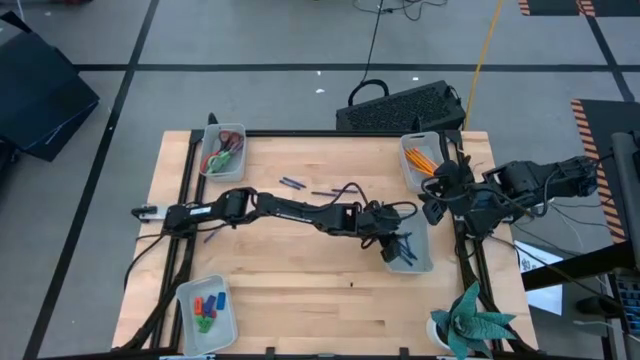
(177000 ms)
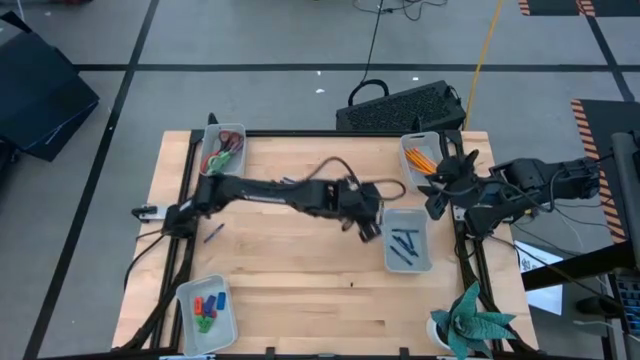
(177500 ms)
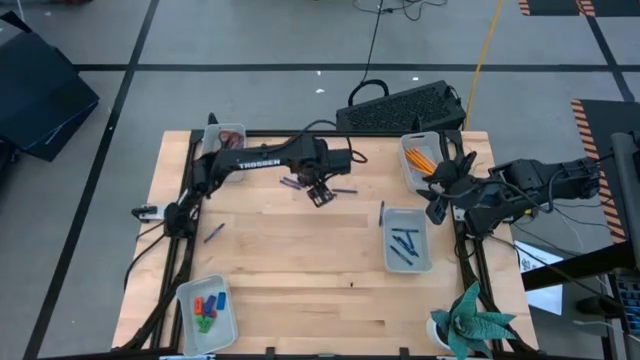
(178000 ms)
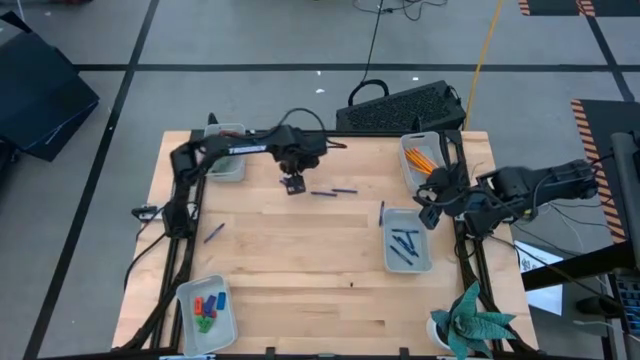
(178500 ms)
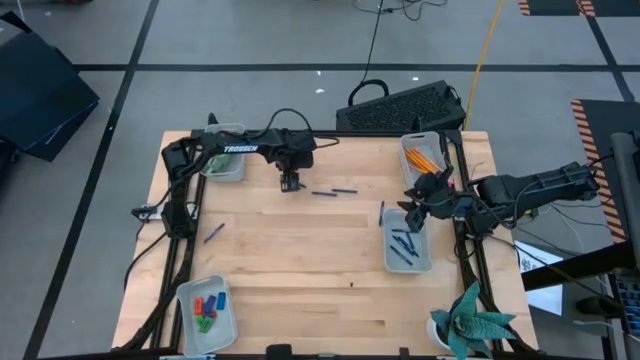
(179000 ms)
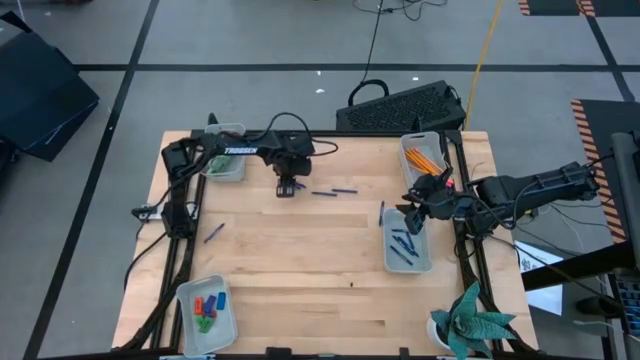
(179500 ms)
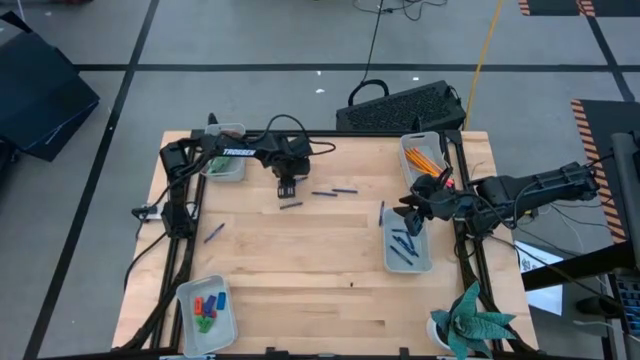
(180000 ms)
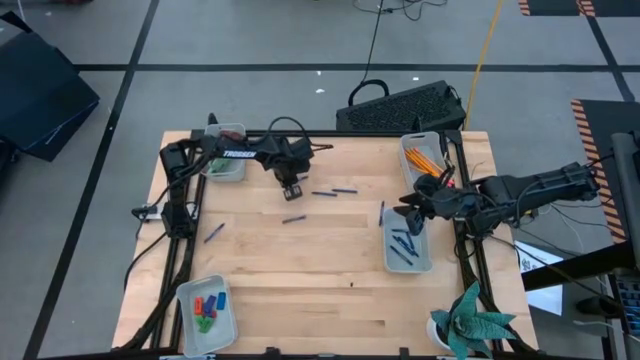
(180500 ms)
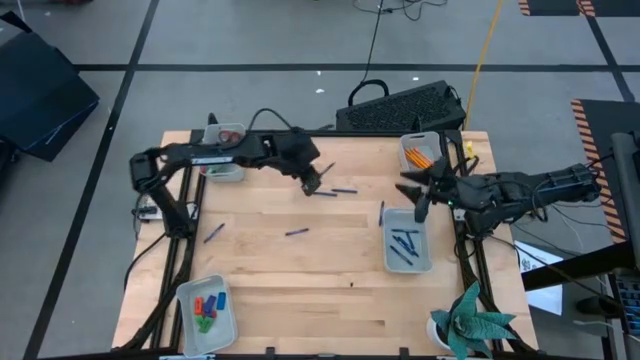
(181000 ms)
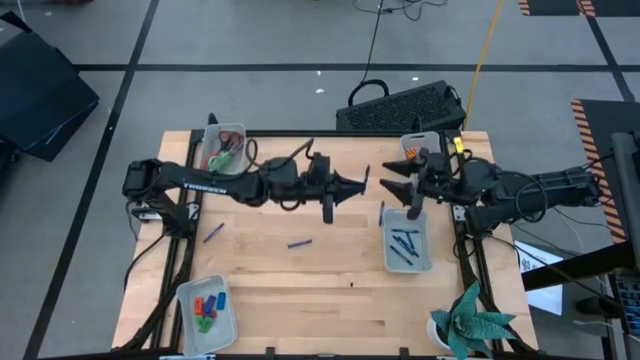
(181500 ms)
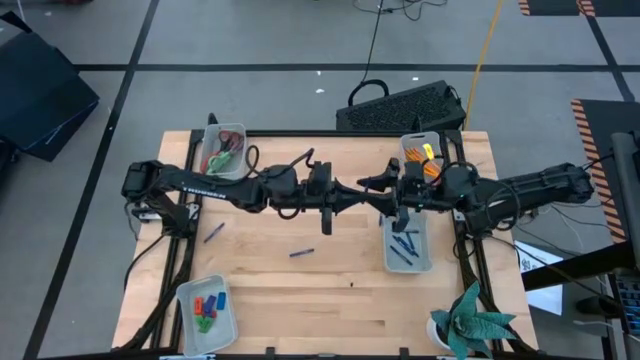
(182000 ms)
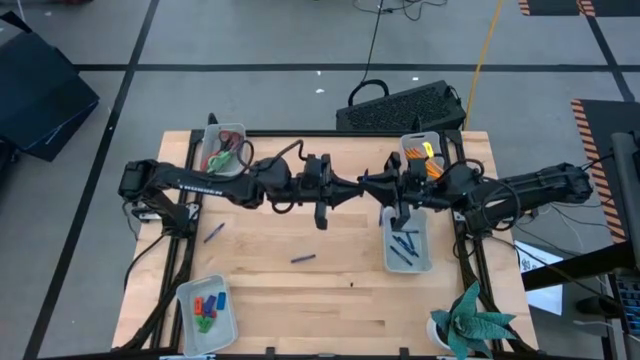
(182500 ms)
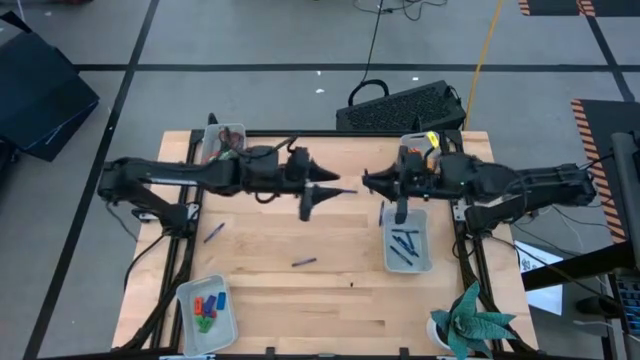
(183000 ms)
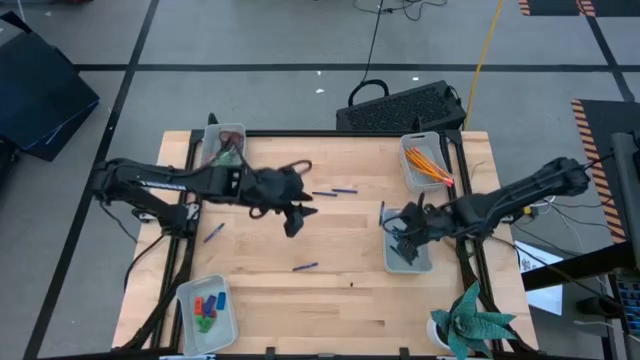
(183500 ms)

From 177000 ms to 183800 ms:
Task: Sort crayons/erasers/pens/pencils in bins
Put the blue crayon into the middle right gray bin

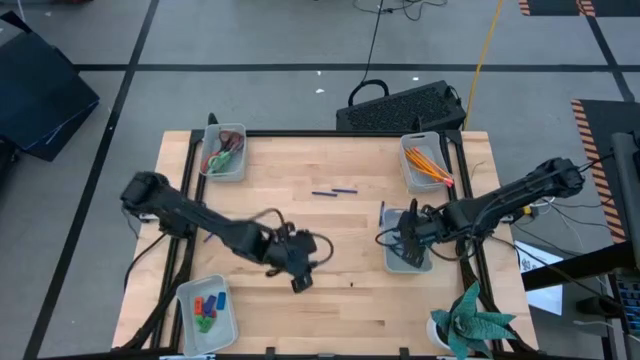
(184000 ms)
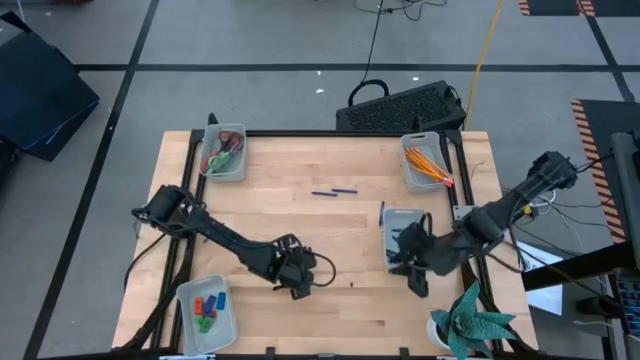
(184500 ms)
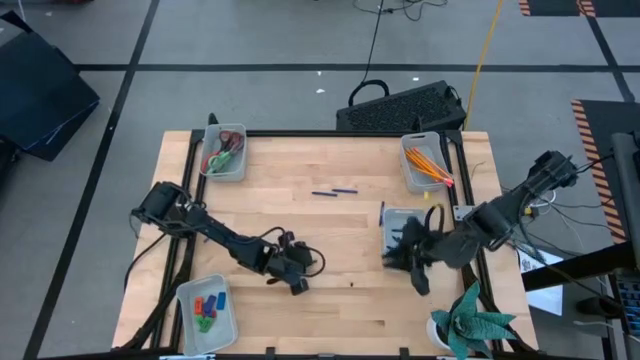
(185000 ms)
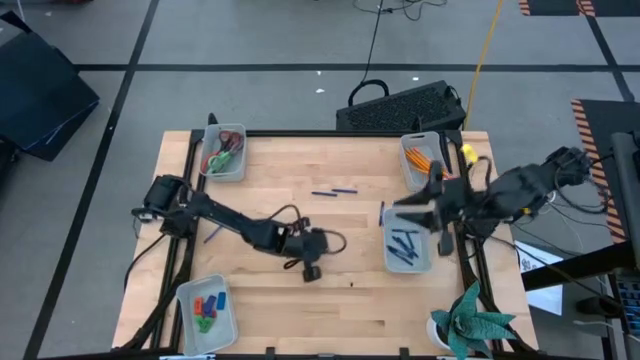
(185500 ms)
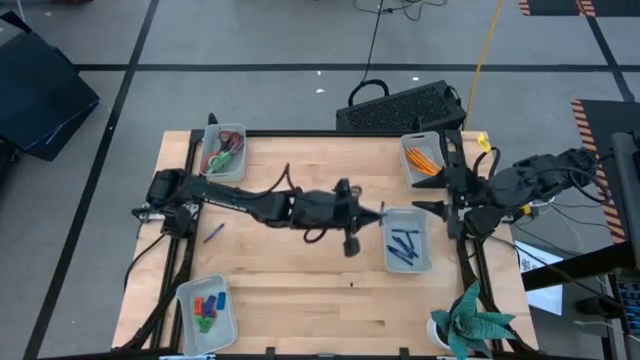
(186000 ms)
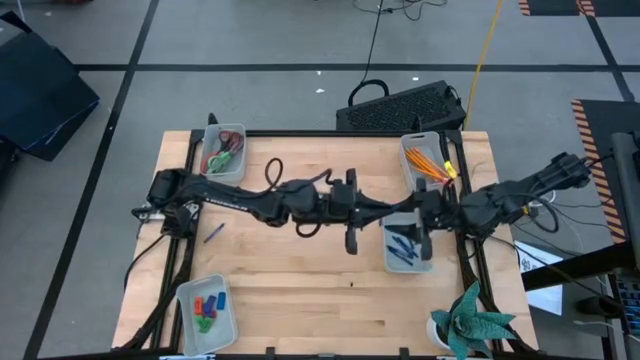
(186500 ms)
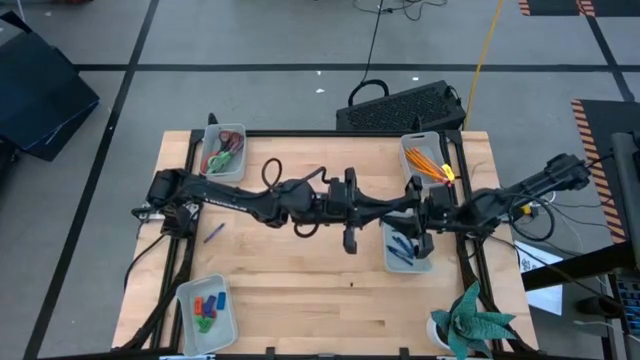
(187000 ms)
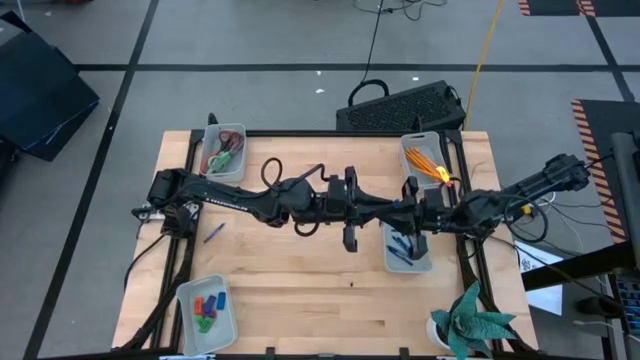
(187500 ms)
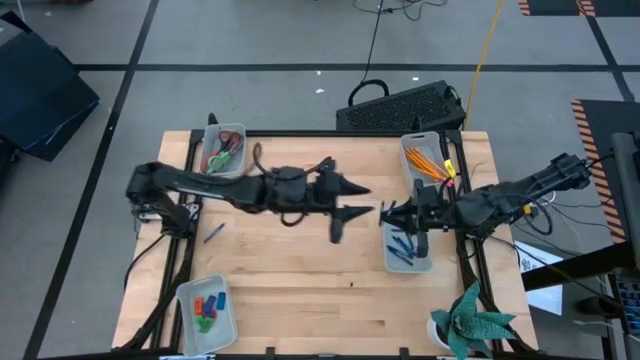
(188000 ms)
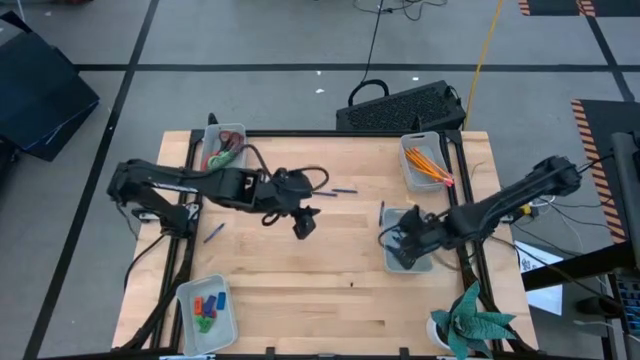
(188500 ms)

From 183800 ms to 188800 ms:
Put the blue crayon into the middle right gray bin

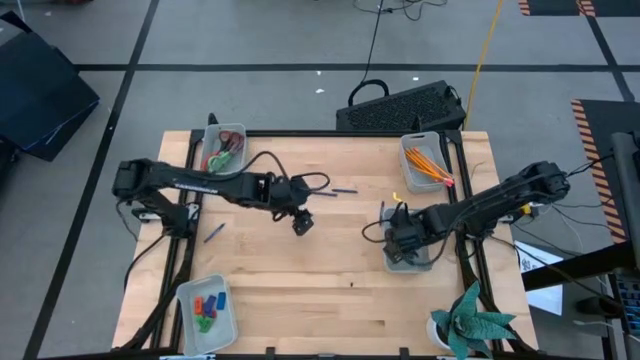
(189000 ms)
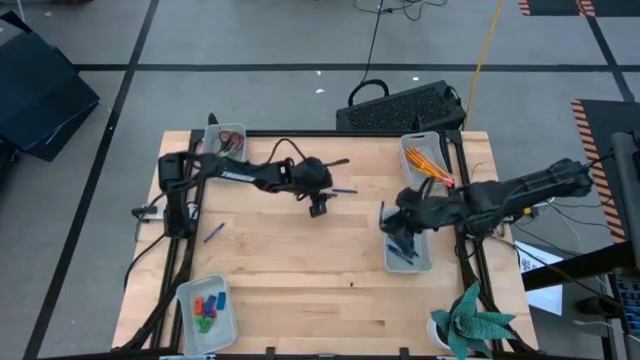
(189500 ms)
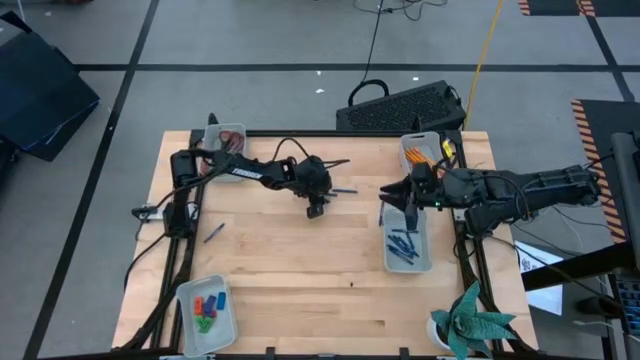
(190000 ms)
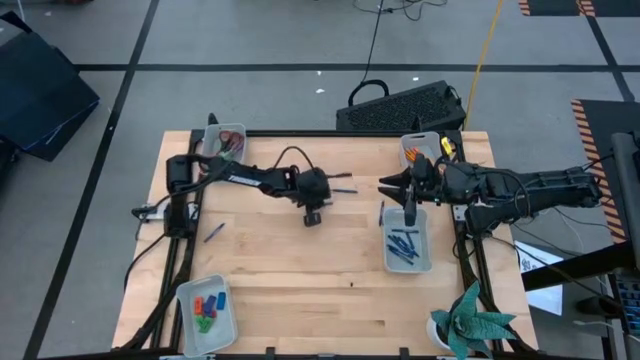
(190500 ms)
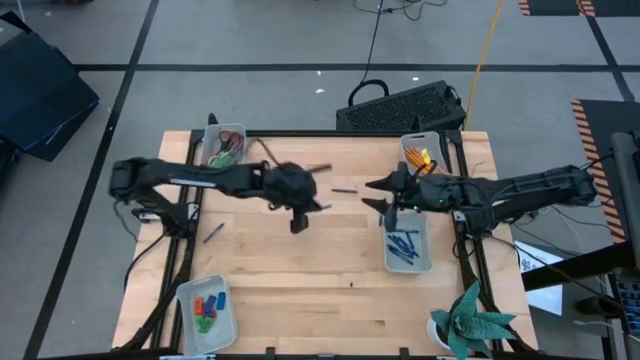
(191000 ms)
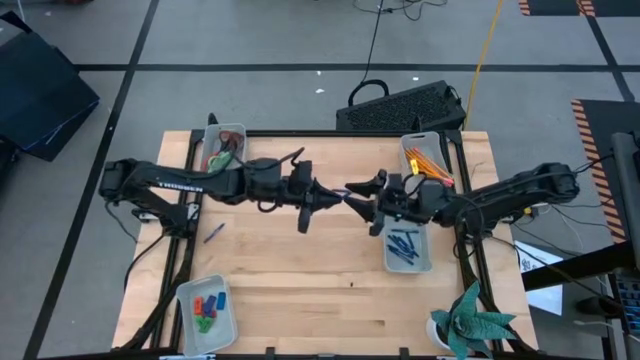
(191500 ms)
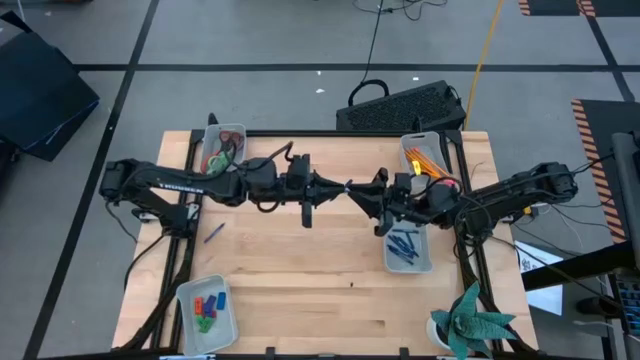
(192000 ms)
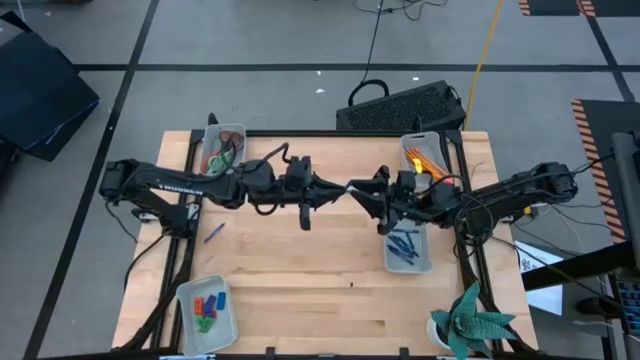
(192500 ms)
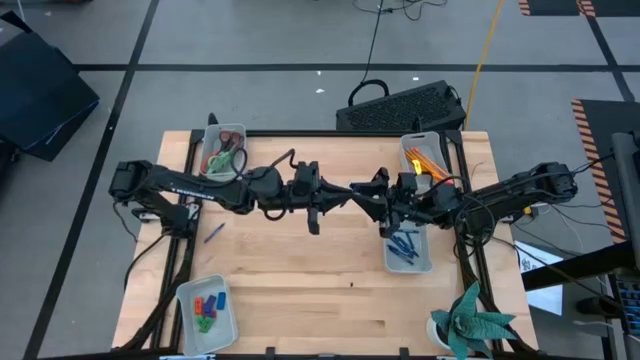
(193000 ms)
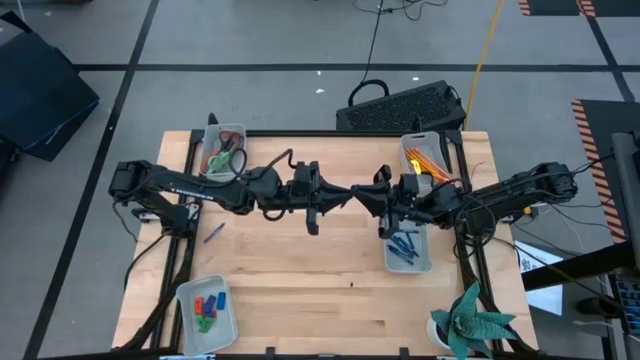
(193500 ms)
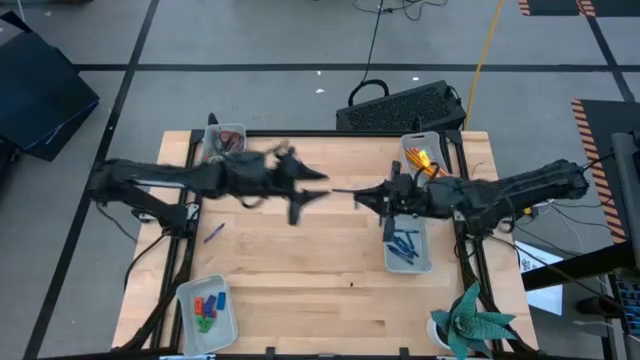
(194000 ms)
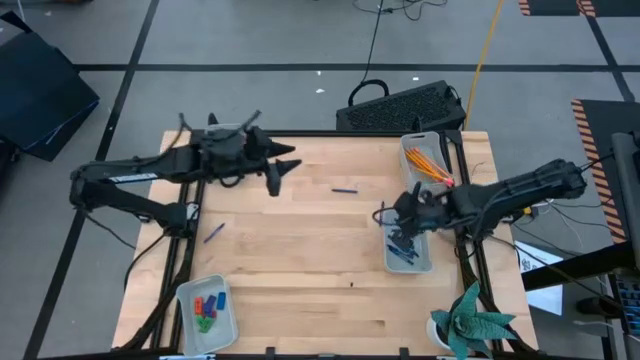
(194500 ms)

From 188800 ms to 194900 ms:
Put the blue crayon into the middle right gray bin

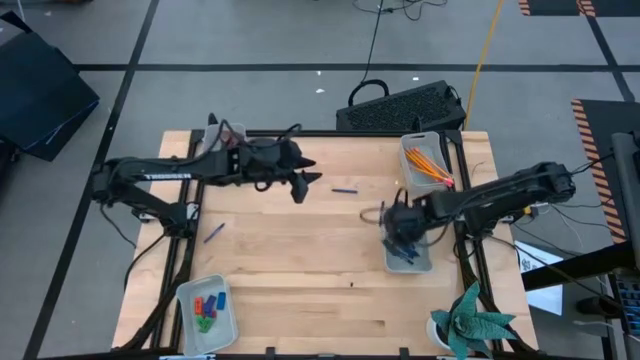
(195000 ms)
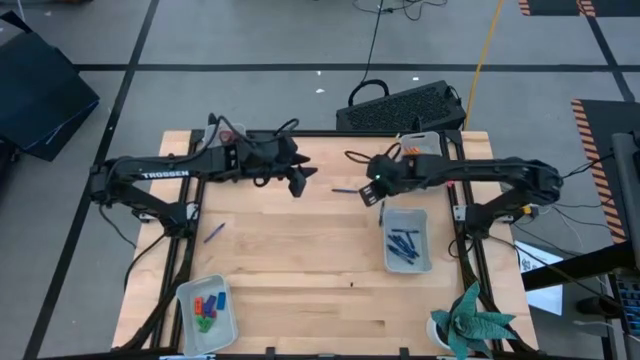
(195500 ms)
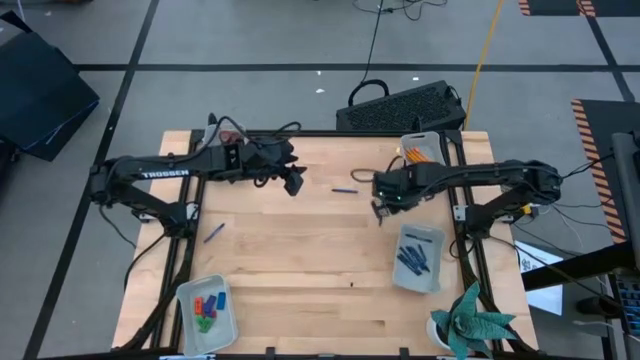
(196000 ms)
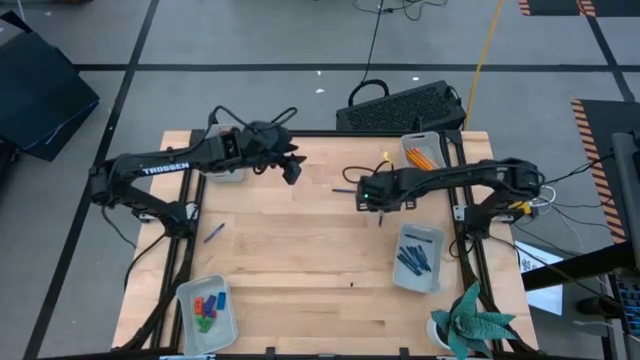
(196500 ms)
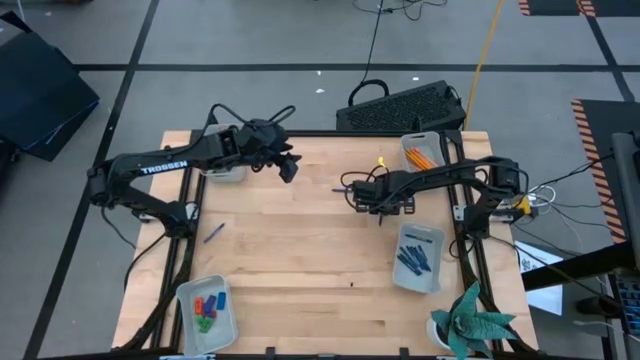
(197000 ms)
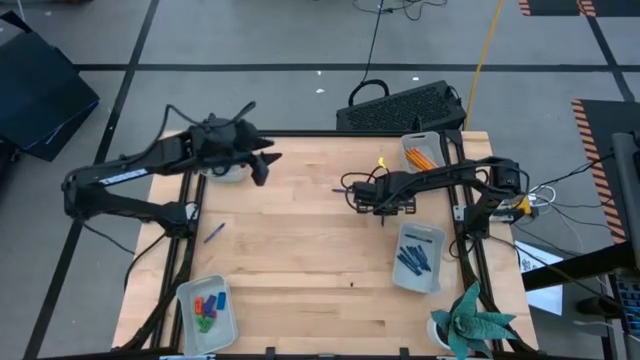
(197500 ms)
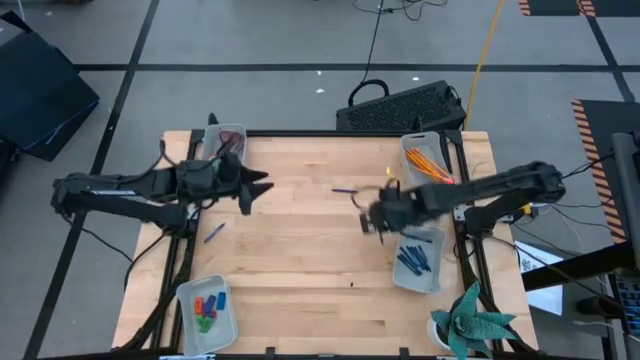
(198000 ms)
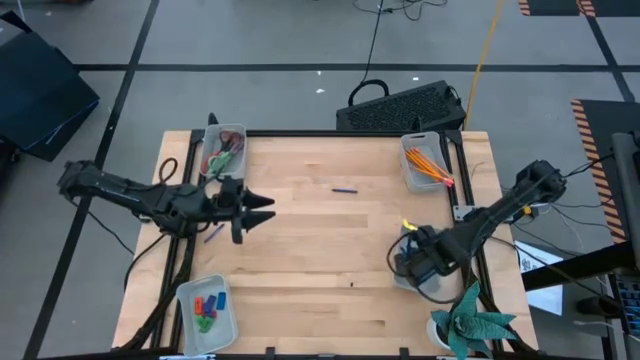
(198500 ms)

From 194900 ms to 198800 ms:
Put the blue crayon into the middle right gray bin
